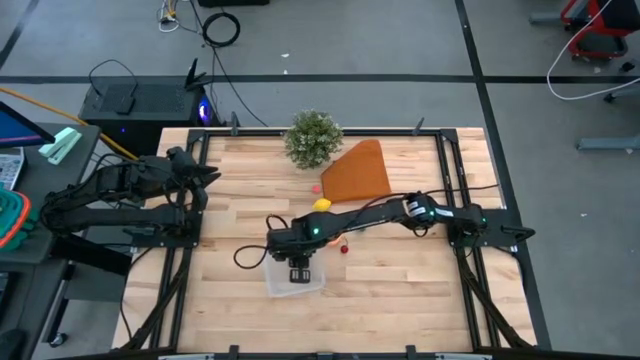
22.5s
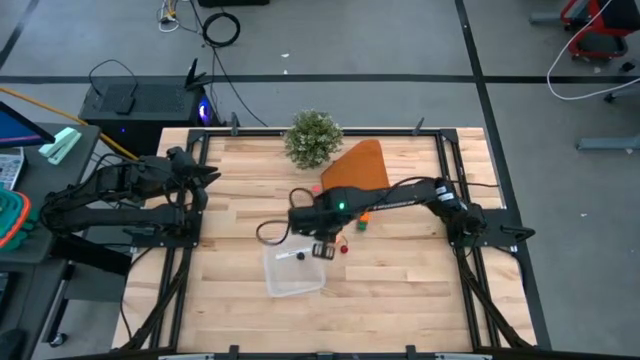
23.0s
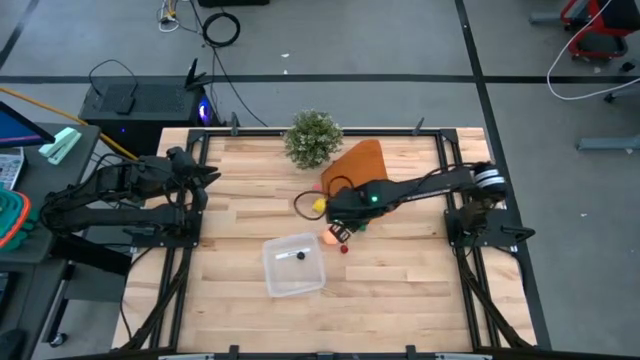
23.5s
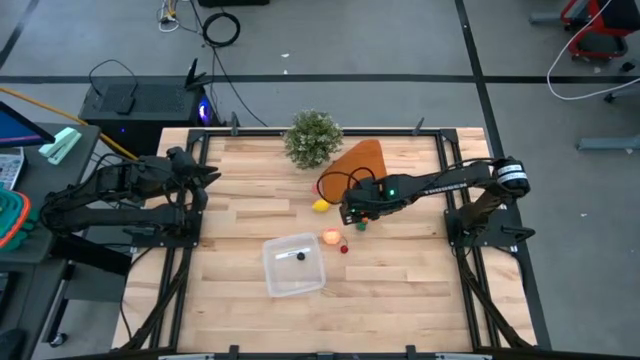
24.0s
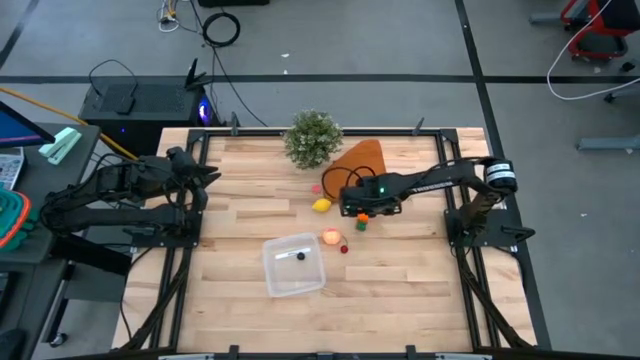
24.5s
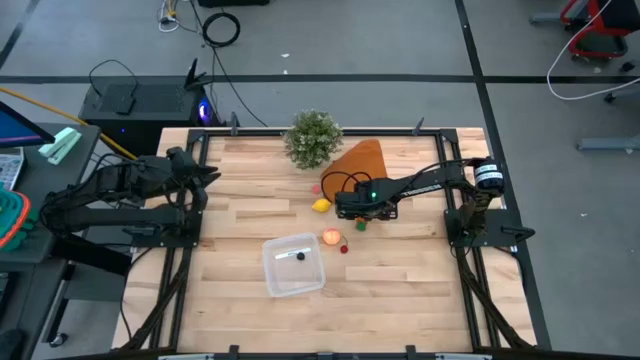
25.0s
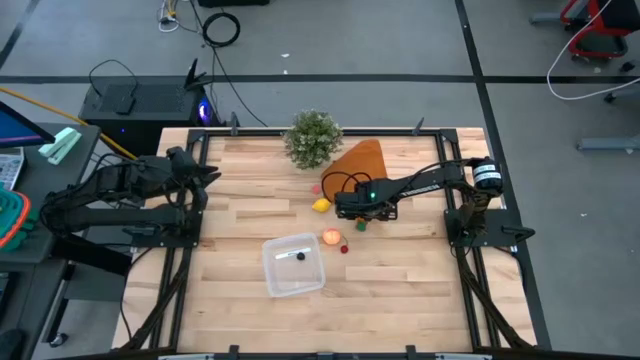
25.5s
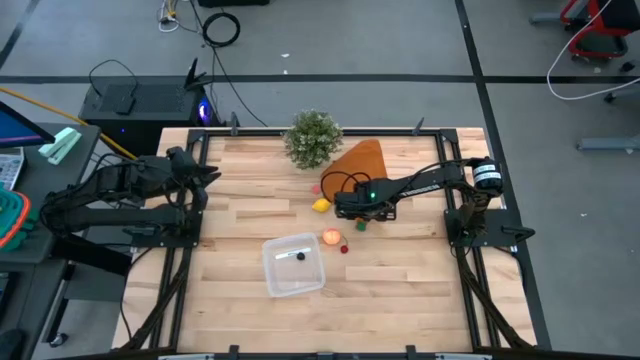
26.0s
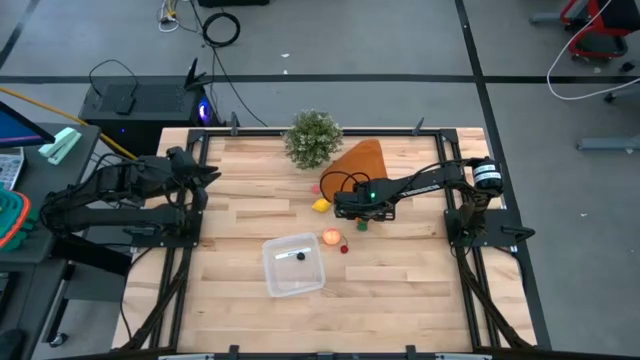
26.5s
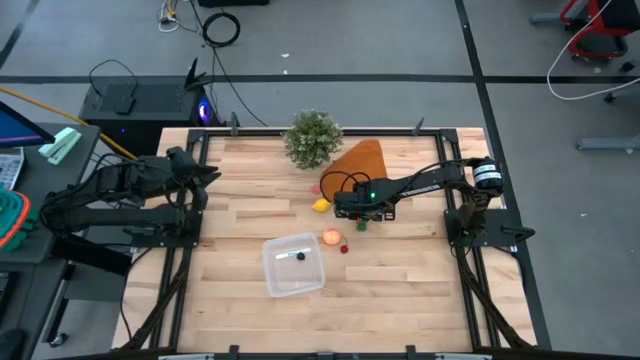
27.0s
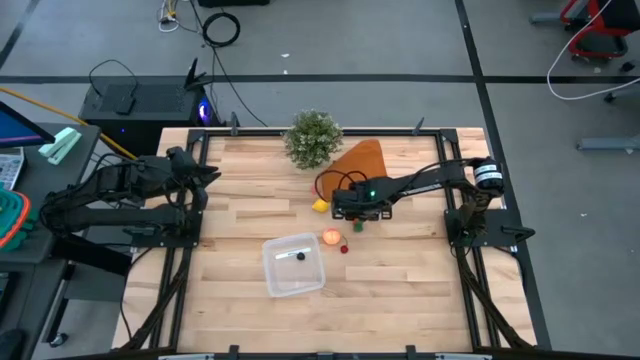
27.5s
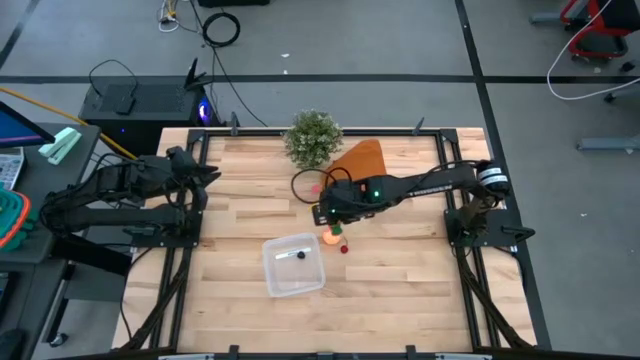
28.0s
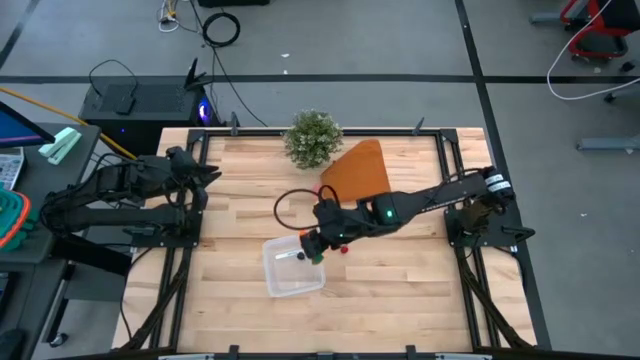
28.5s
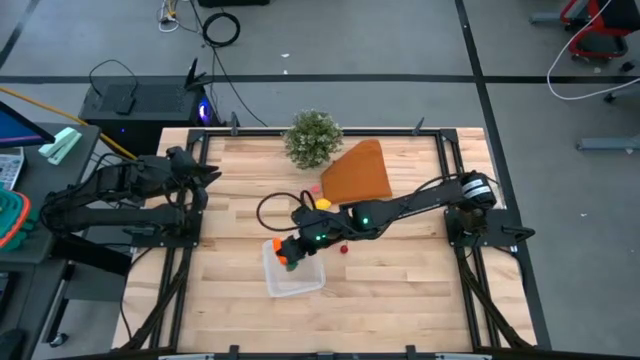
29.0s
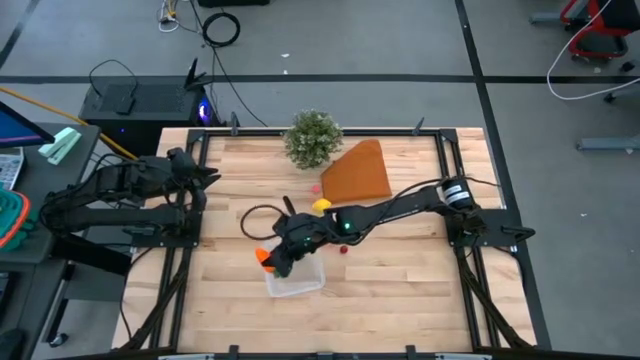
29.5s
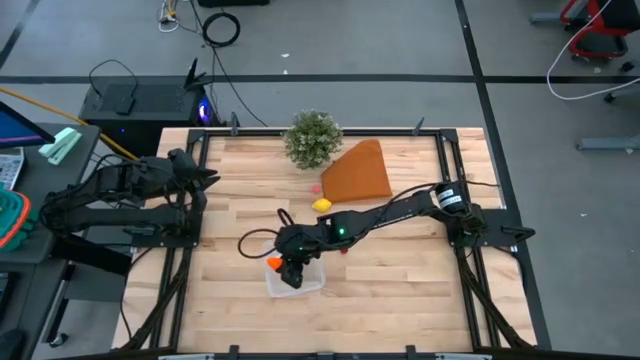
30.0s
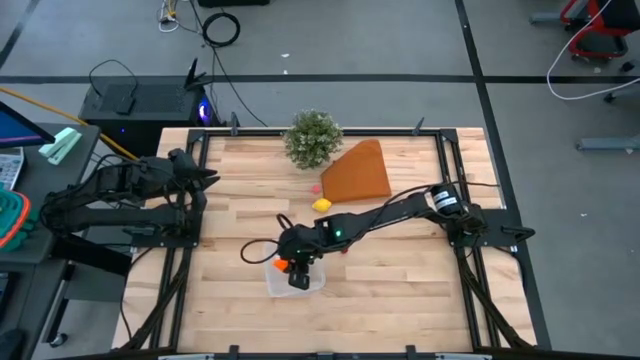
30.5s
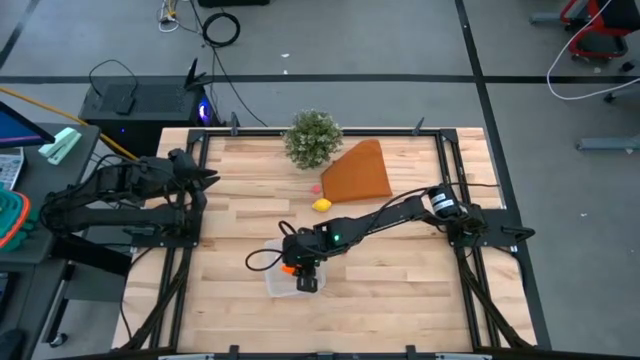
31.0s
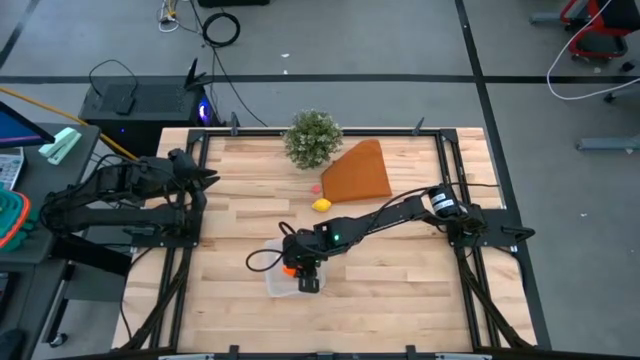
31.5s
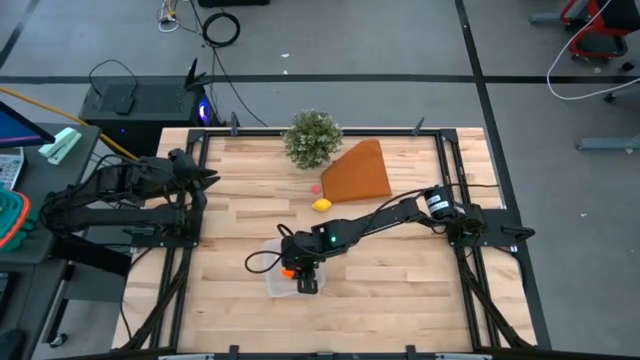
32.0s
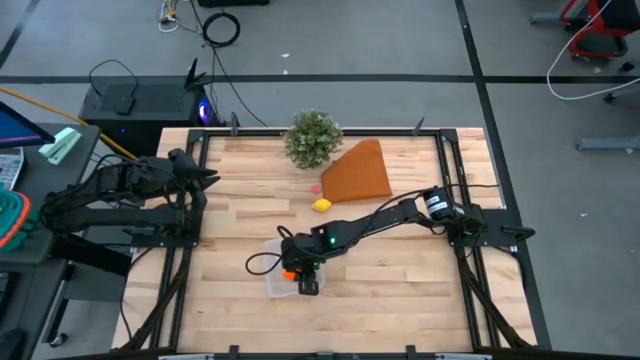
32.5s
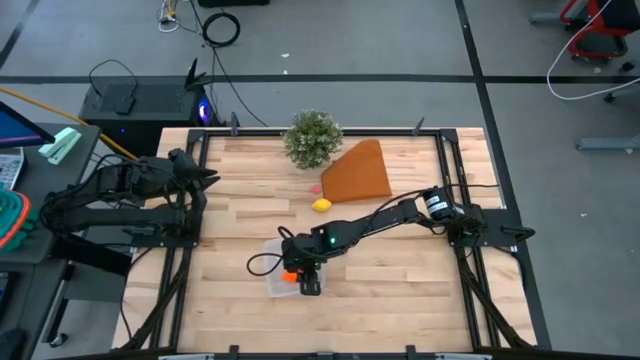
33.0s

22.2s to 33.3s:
Task: Pick and placing Produce into tupperware
Put the carrot into the transparent bin

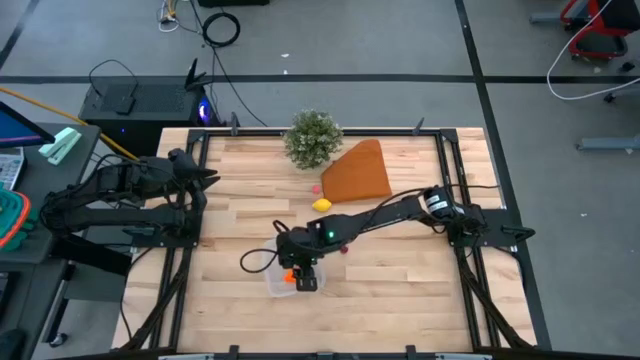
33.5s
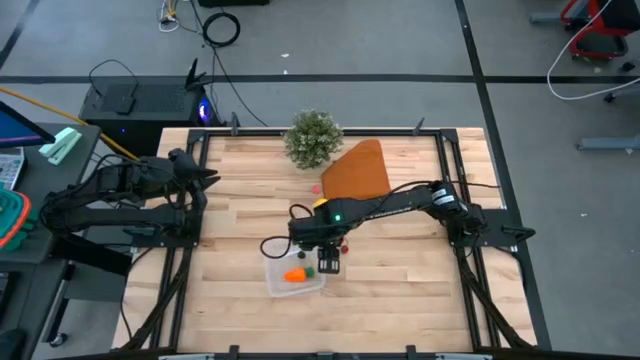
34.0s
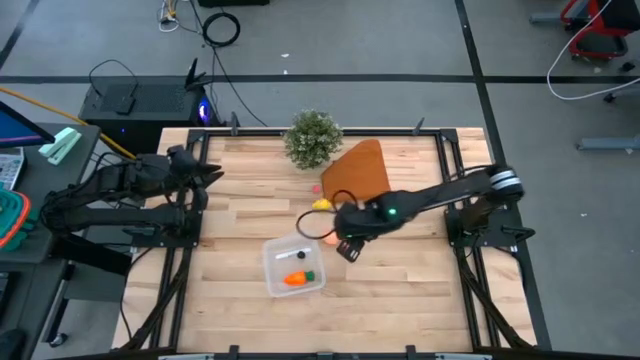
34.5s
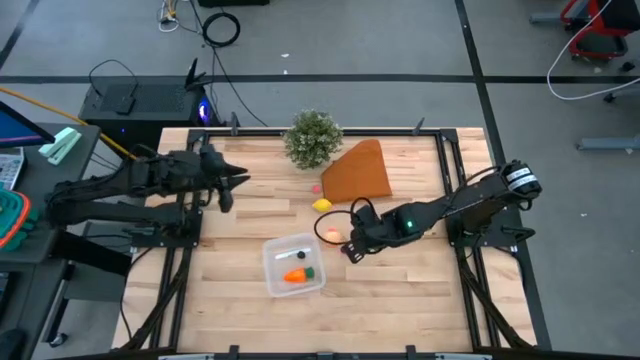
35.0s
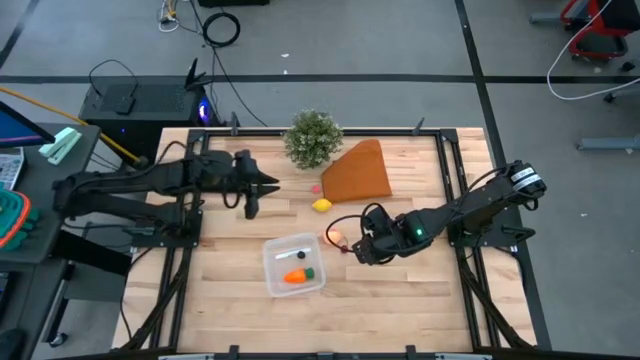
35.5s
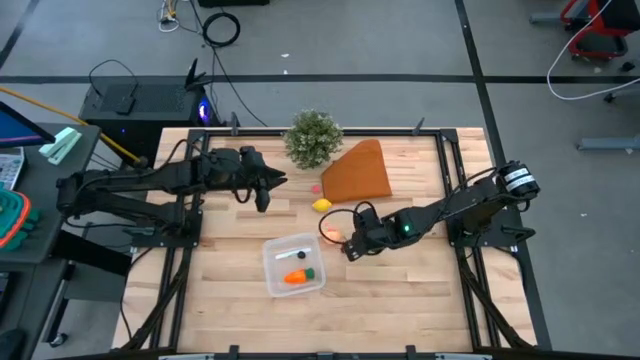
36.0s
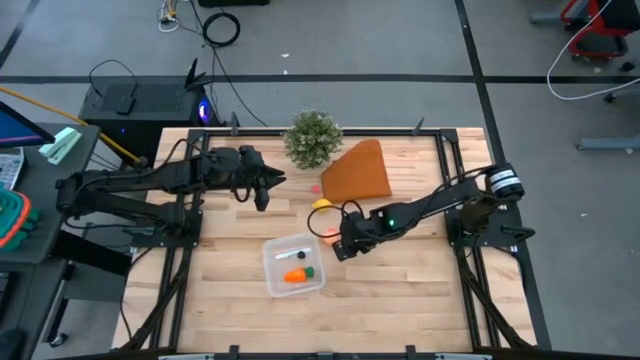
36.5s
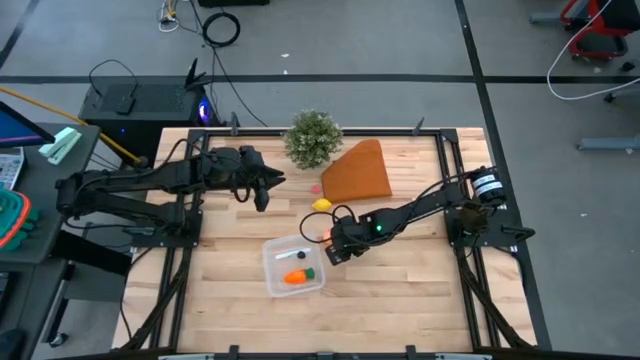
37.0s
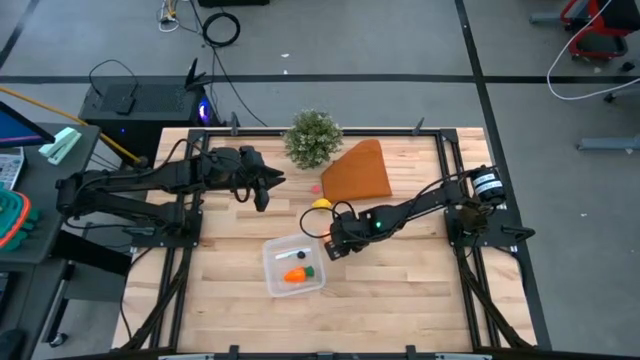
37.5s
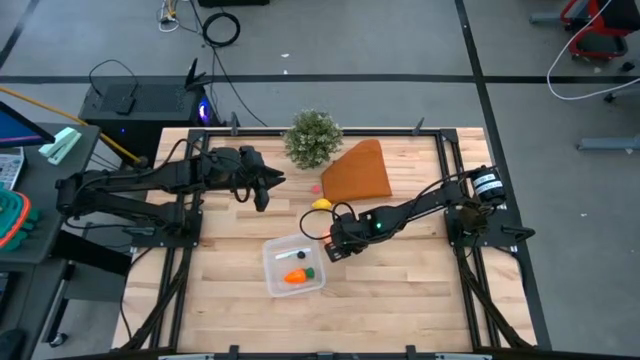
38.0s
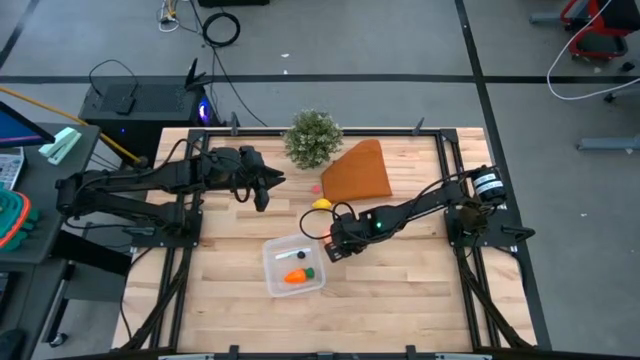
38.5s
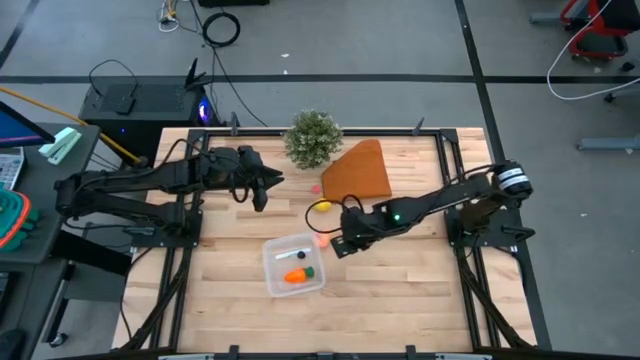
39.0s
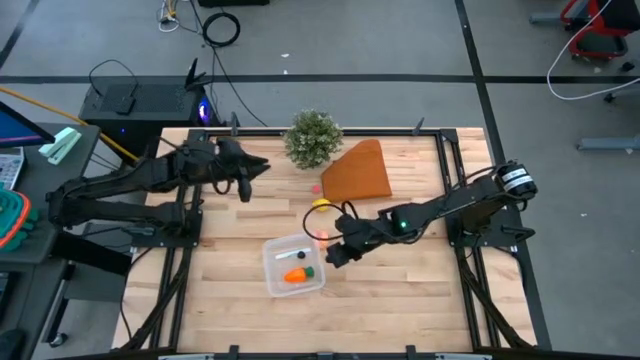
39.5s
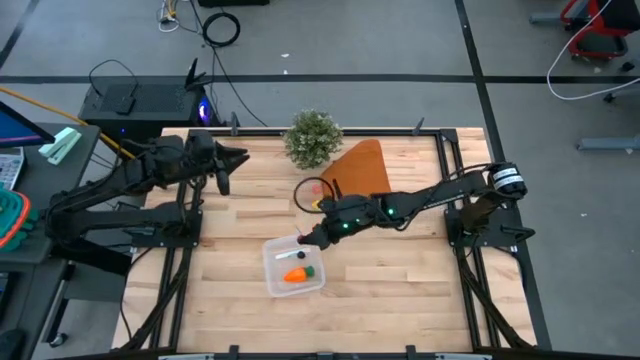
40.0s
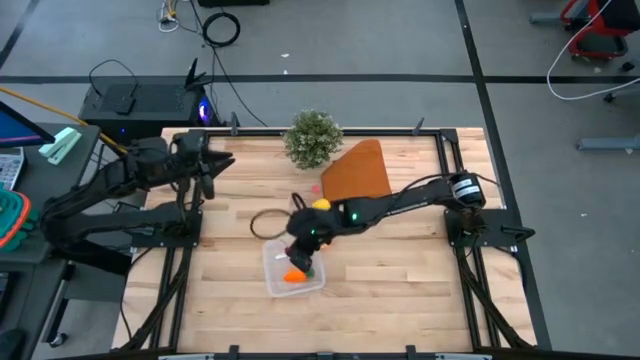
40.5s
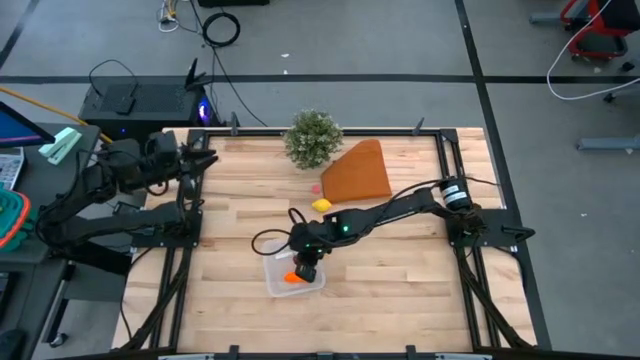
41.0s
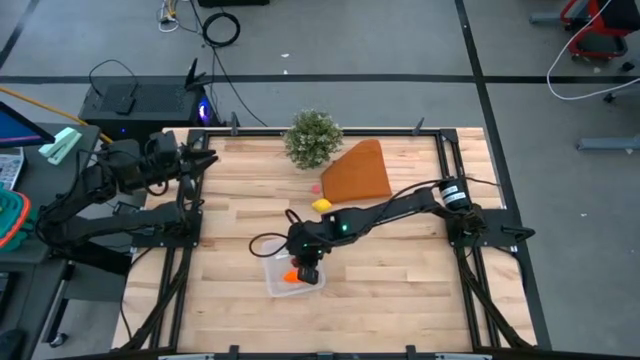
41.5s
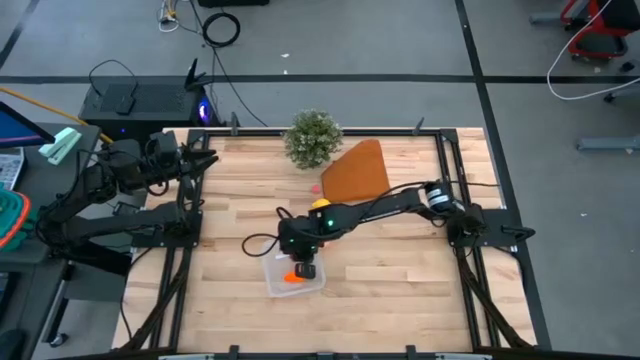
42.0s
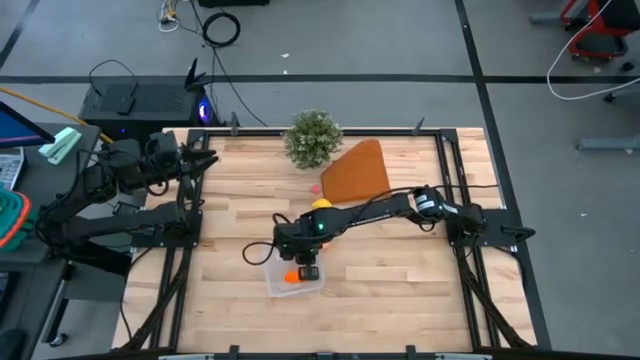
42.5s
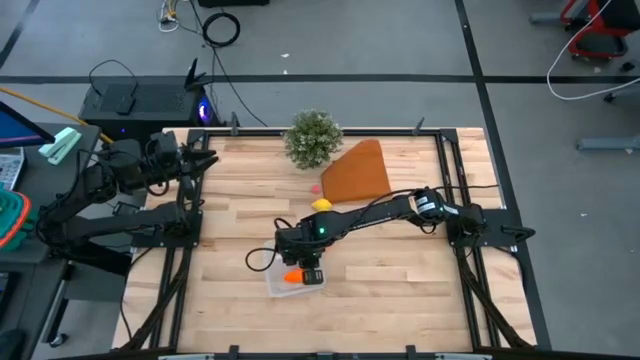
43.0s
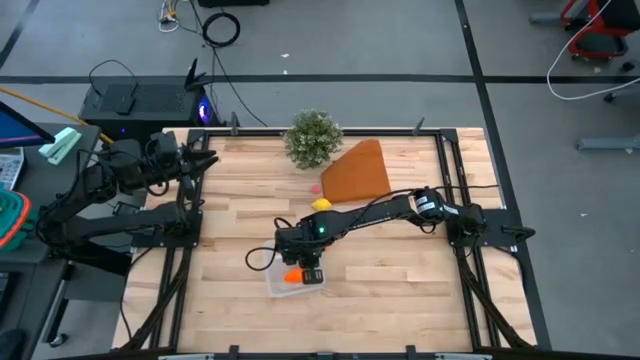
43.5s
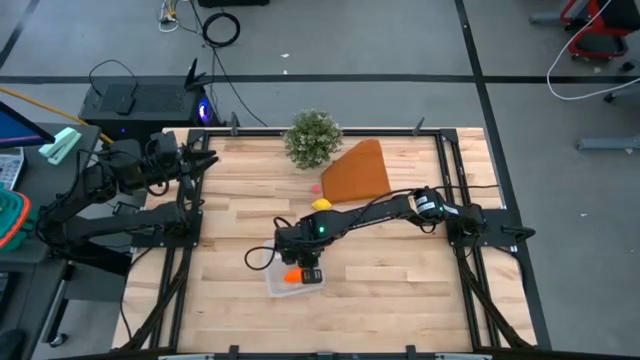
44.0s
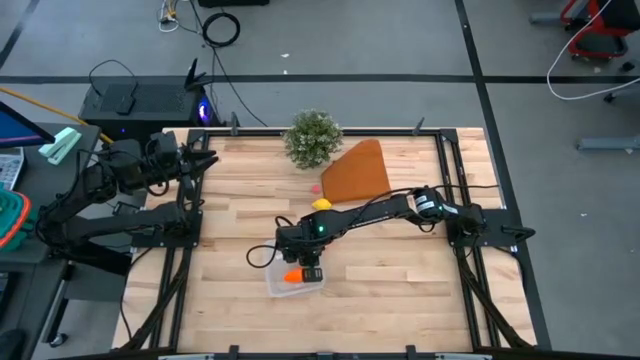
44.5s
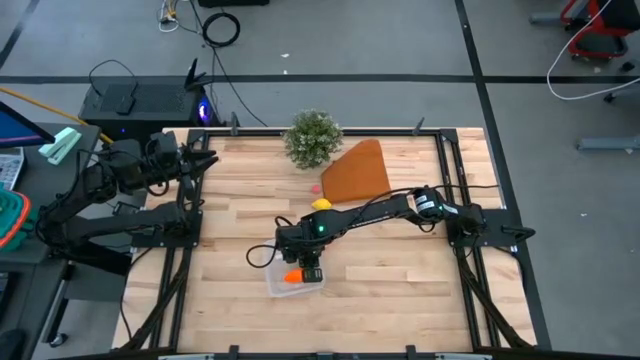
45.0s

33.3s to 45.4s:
Put the red cherry into the transparent bin
